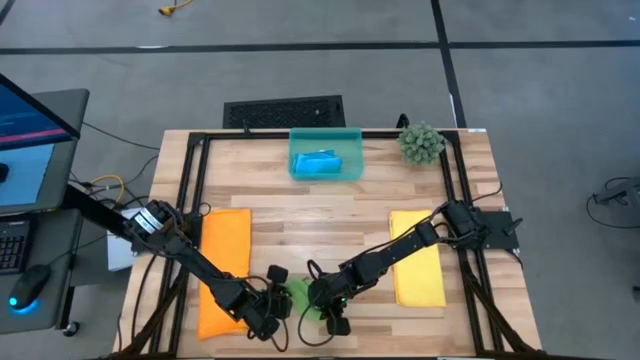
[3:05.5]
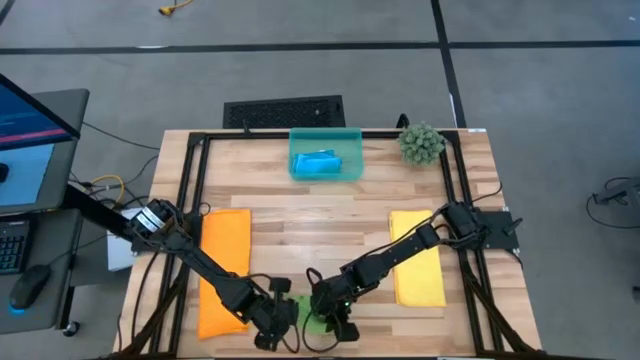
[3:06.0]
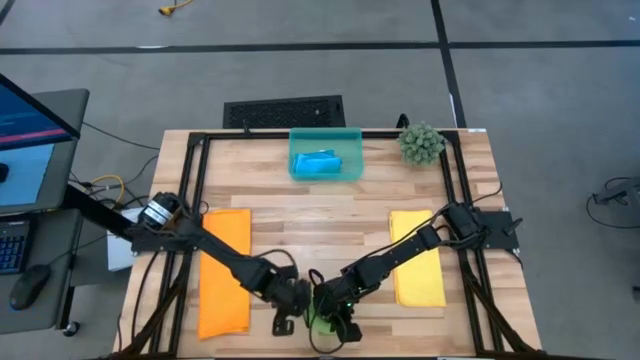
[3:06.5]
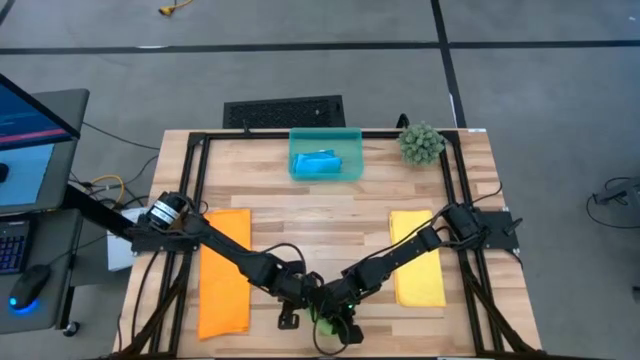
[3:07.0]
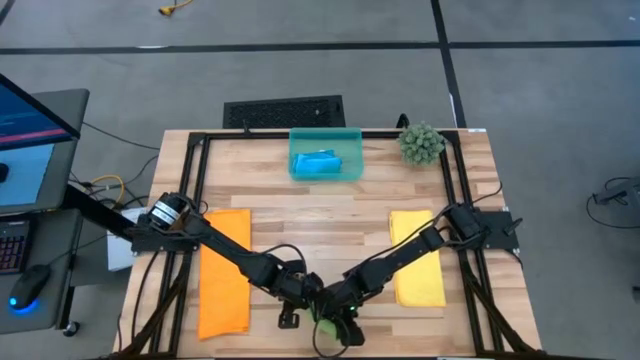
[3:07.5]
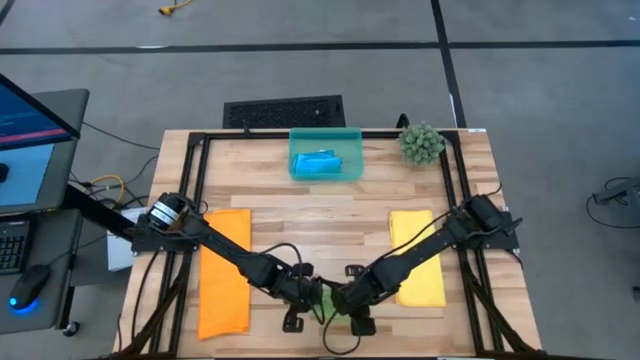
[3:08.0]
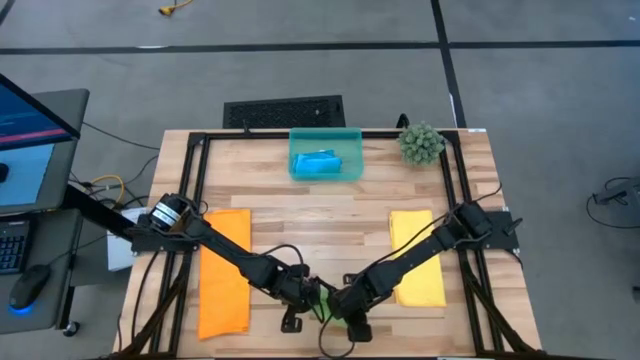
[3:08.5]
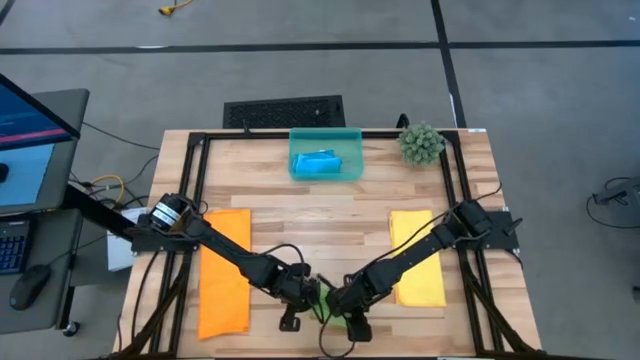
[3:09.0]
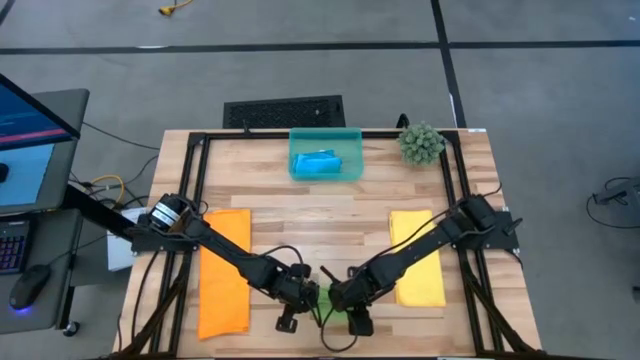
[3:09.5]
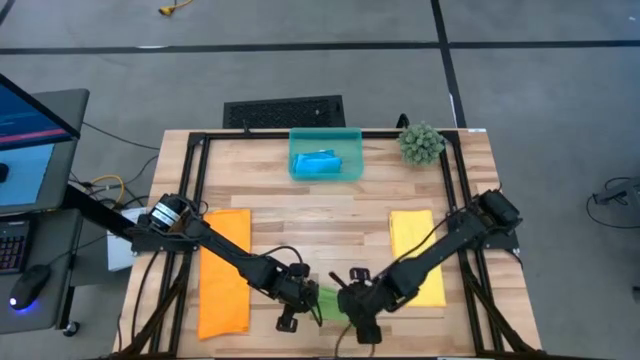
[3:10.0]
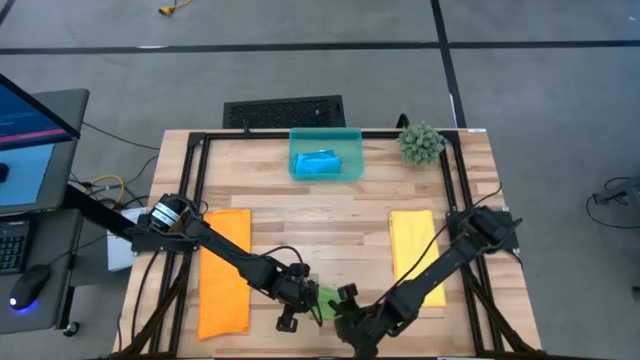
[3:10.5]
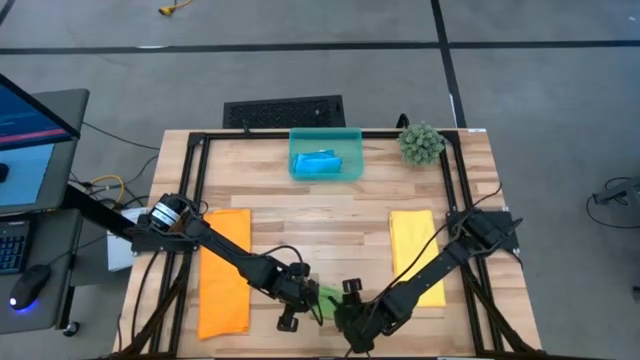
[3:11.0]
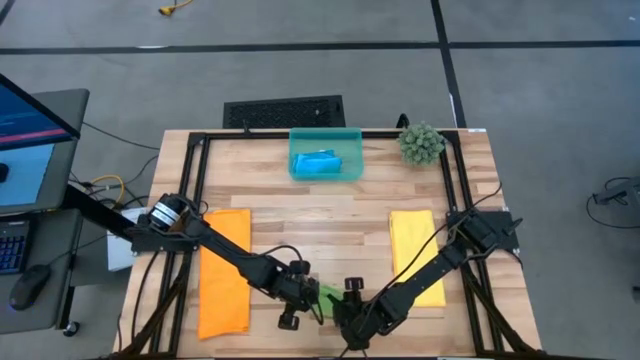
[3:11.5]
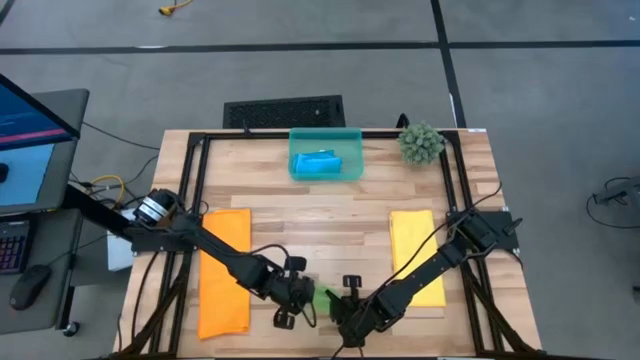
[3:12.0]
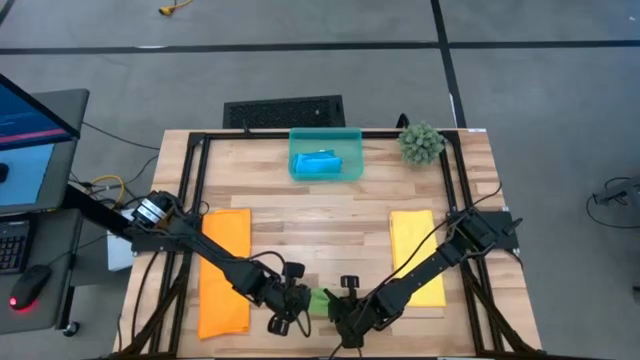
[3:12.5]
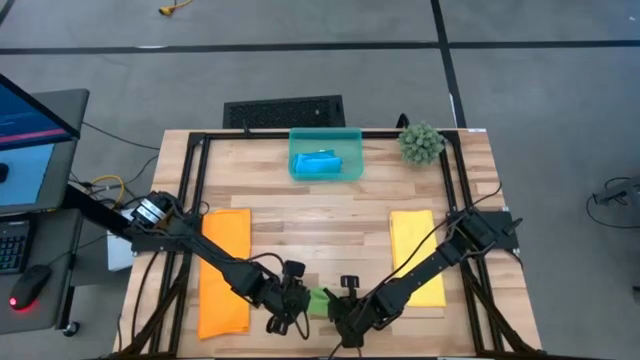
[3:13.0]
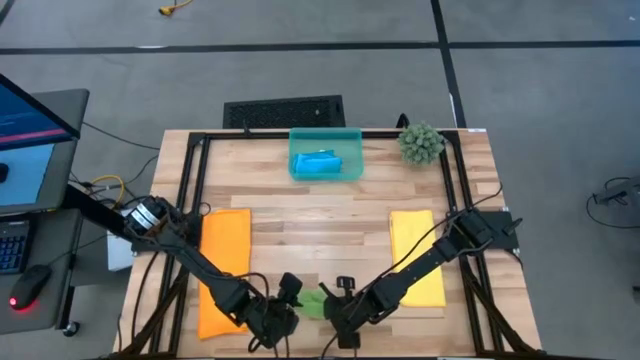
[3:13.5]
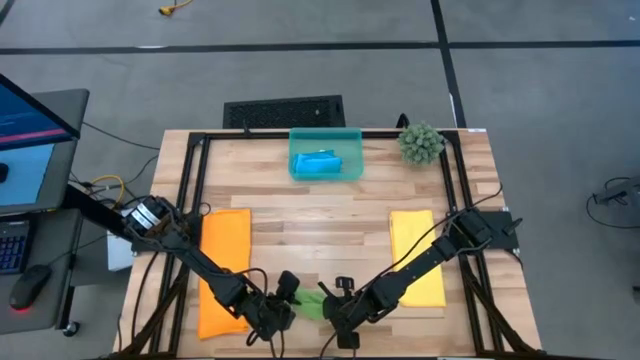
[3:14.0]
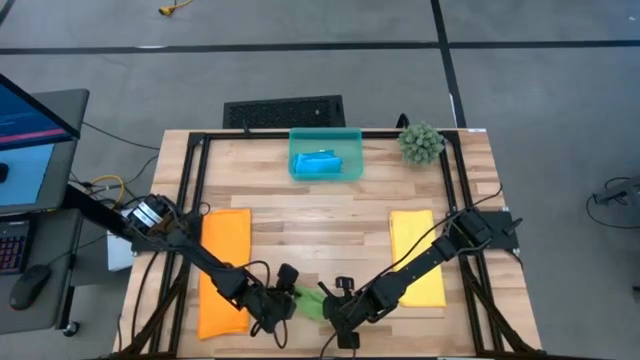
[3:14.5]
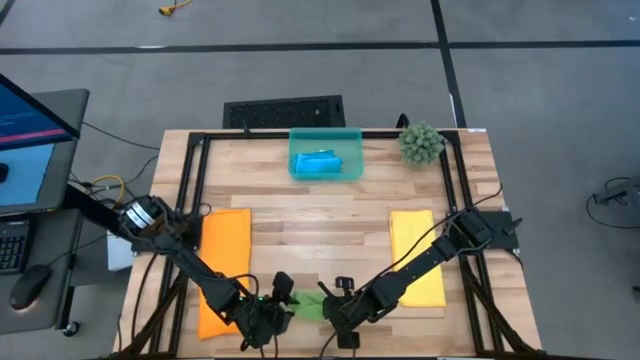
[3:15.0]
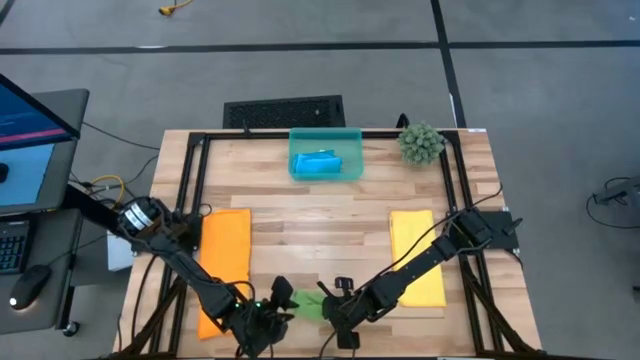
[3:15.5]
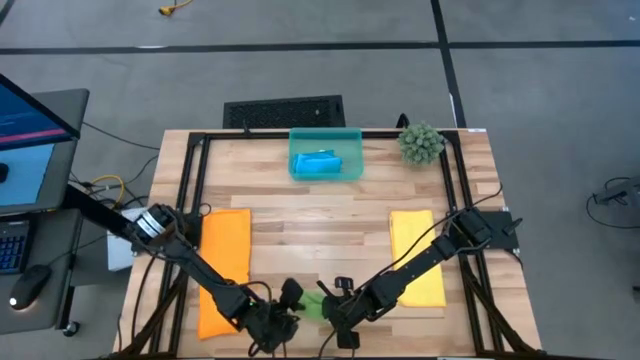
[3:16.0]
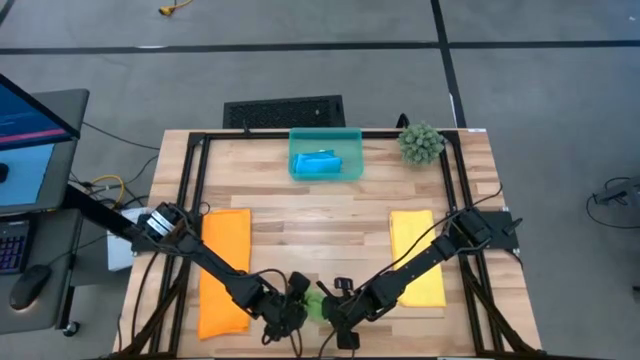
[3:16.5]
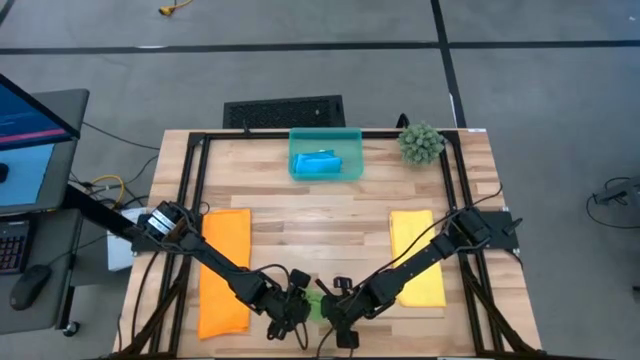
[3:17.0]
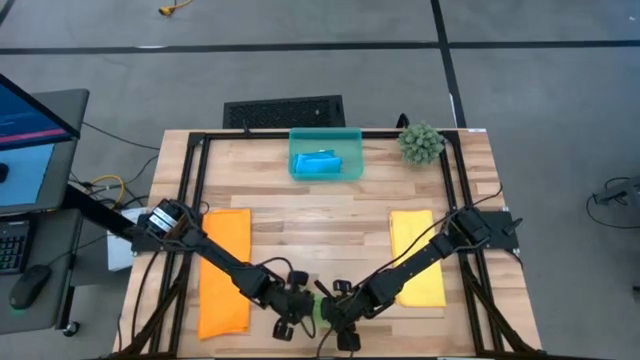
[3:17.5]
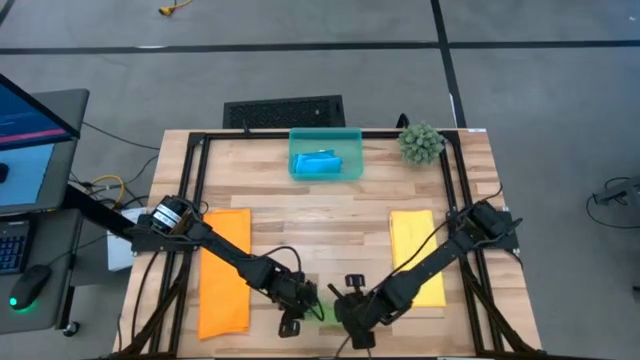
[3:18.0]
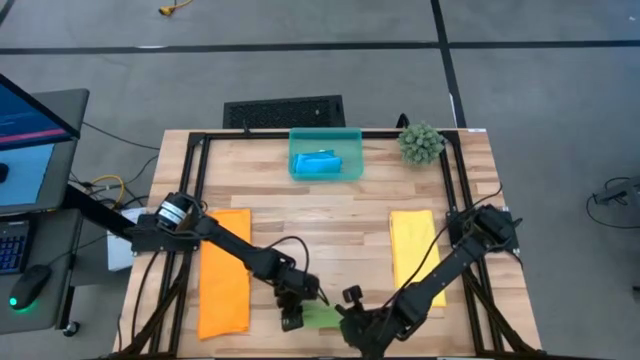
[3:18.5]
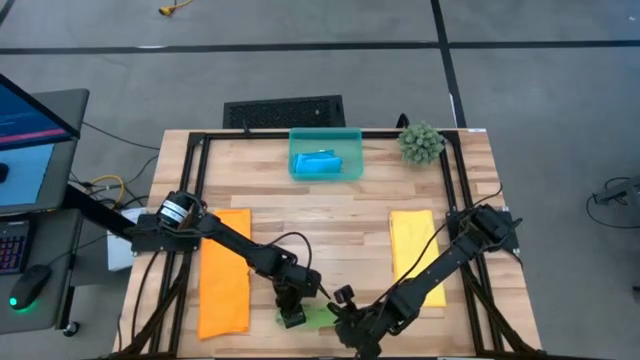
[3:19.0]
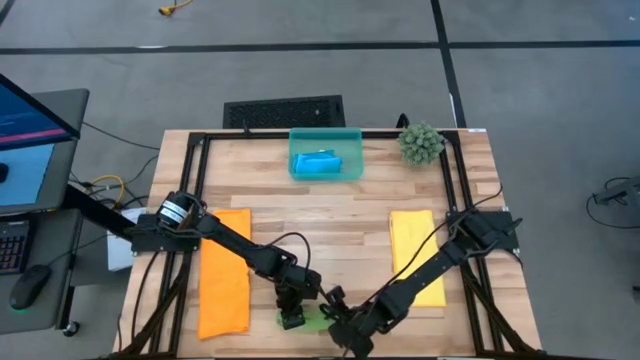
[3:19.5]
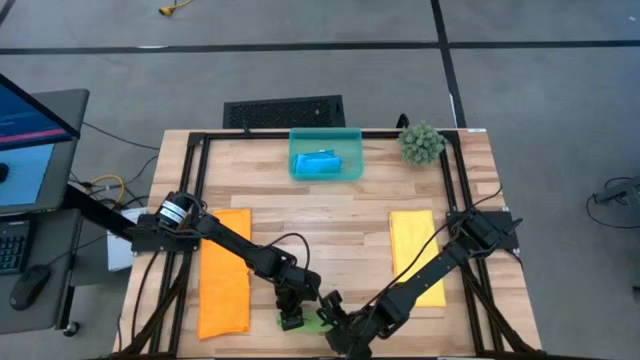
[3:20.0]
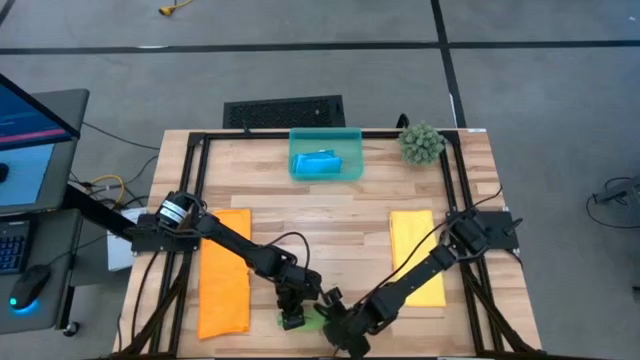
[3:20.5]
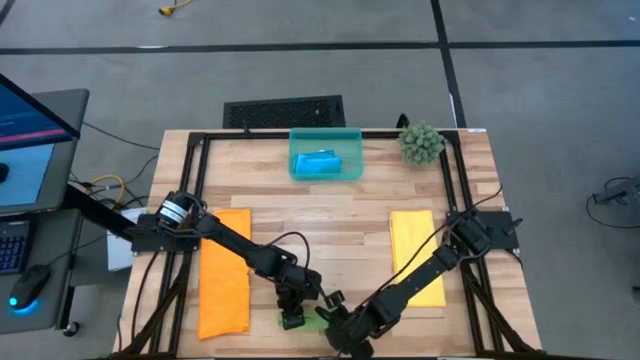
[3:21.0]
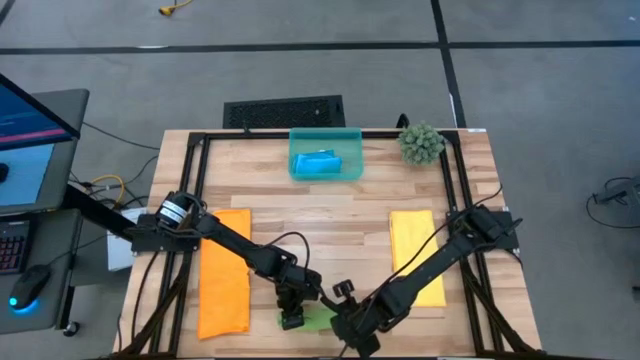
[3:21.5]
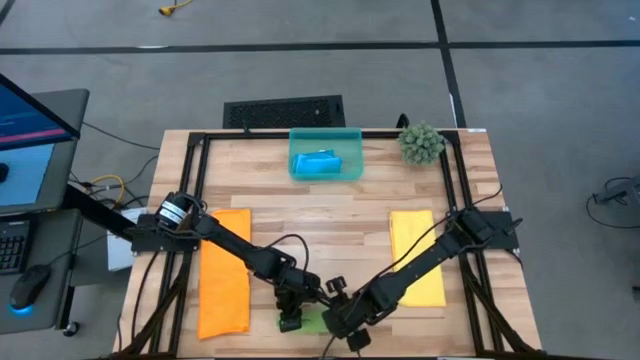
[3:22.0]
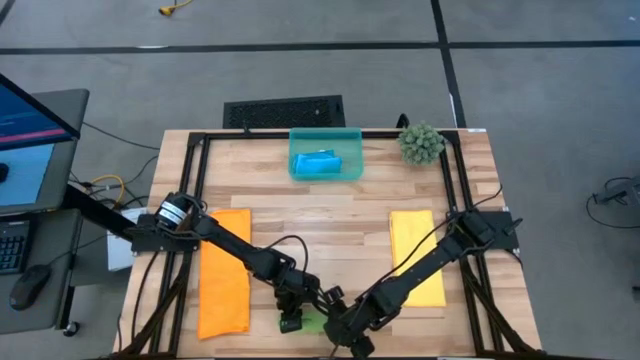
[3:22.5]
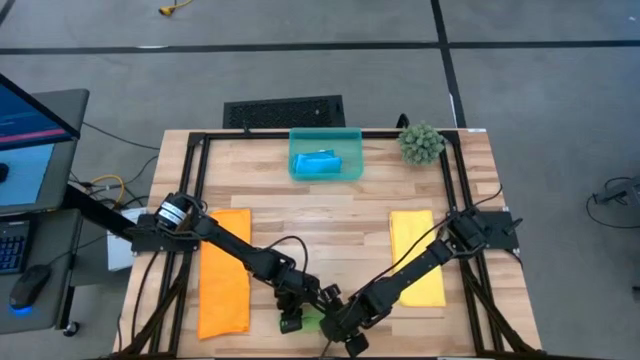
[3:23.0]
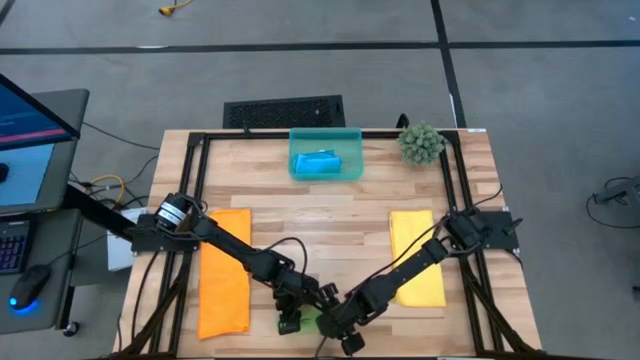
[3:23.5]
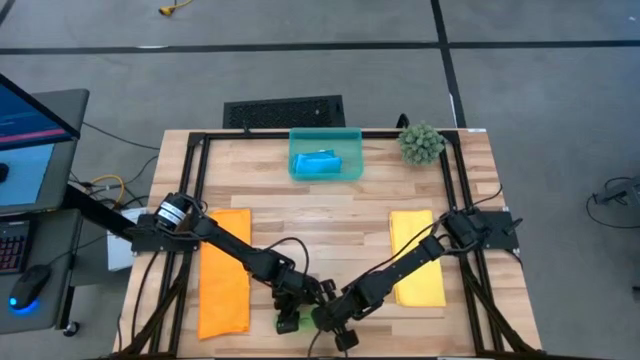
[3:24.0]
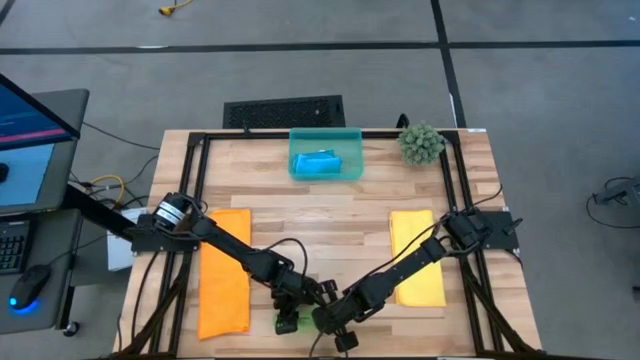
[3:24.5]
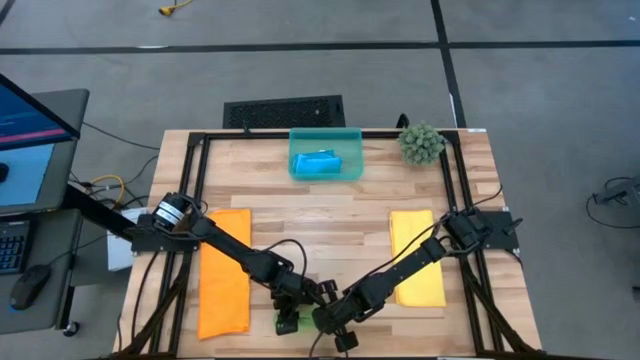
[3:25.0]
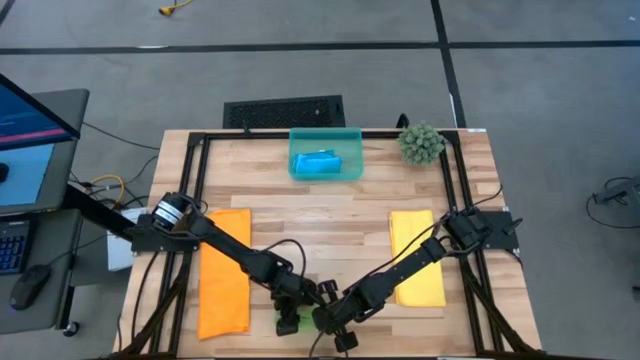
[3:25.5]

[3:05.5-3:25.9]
Task: Roll microfiber towels into tight, uniform cylinder then place into a basket
Roll the green towel
